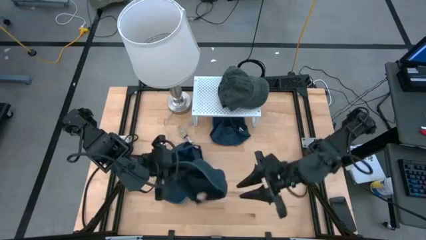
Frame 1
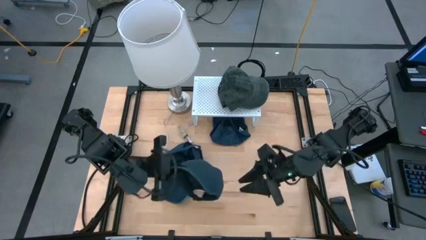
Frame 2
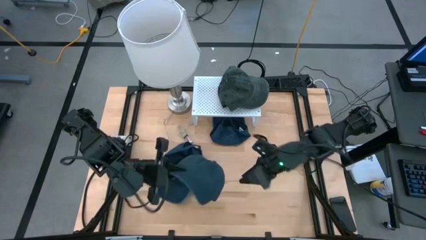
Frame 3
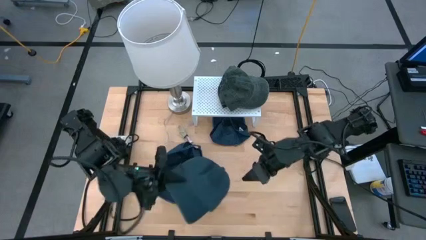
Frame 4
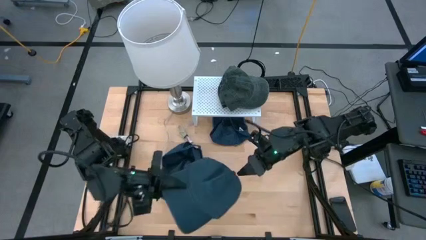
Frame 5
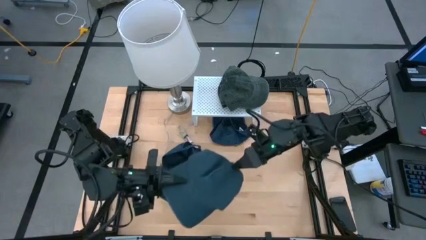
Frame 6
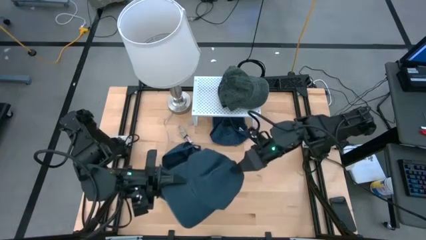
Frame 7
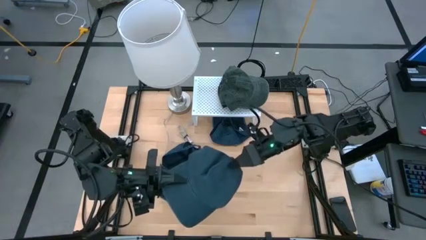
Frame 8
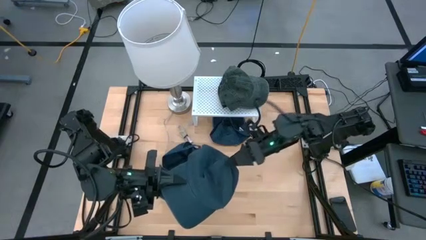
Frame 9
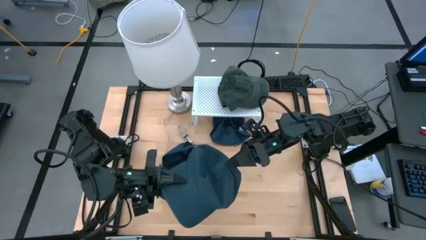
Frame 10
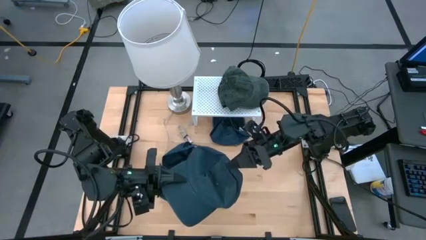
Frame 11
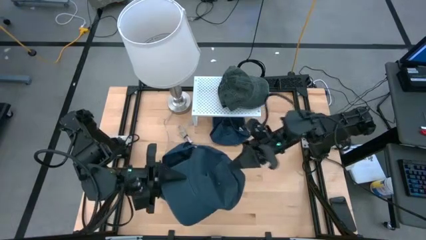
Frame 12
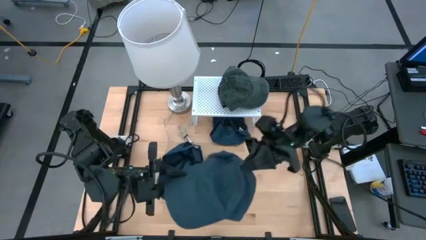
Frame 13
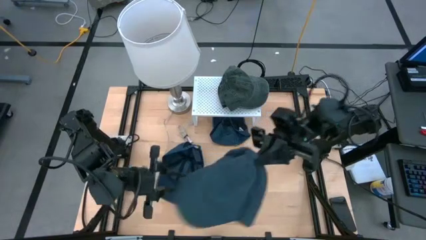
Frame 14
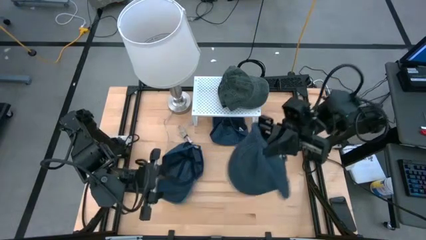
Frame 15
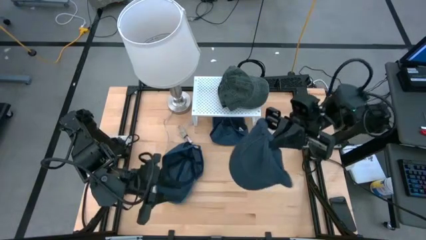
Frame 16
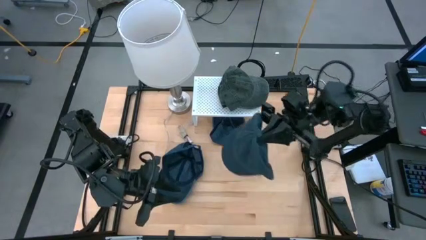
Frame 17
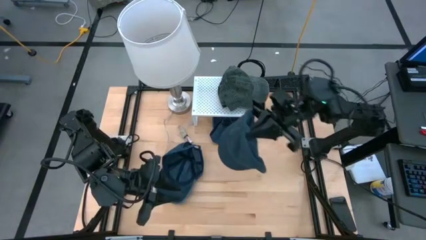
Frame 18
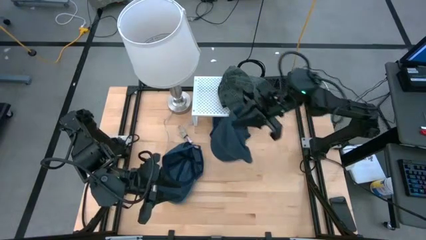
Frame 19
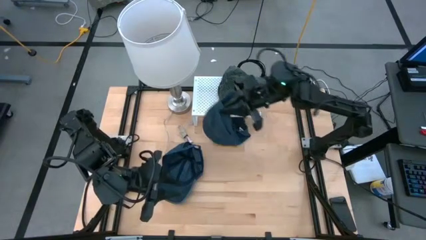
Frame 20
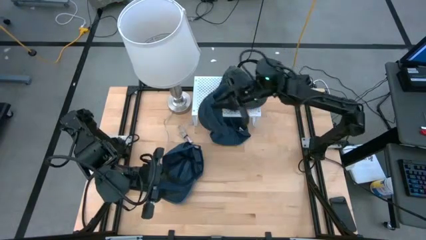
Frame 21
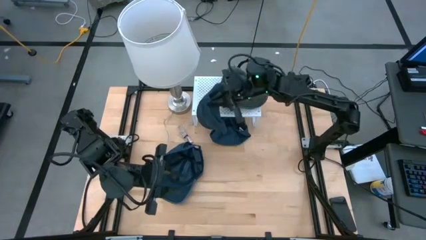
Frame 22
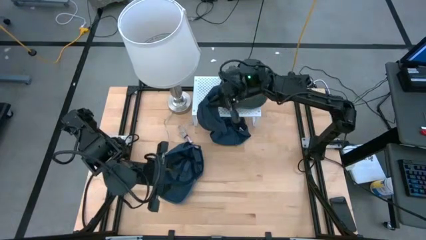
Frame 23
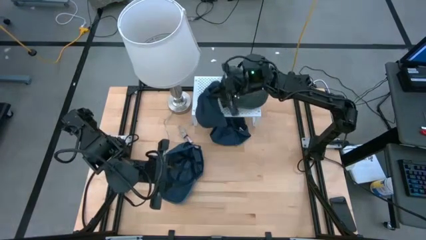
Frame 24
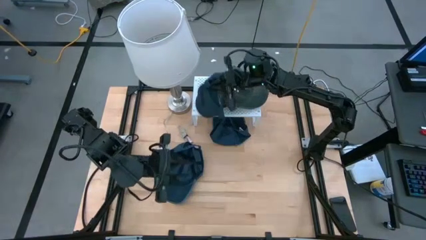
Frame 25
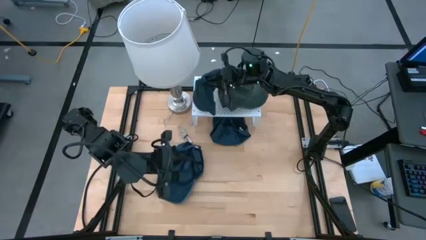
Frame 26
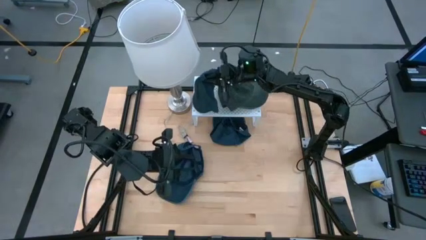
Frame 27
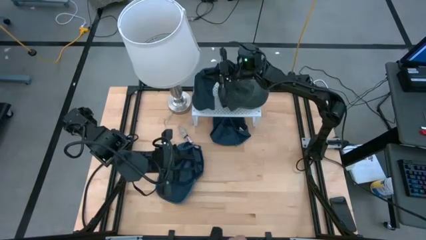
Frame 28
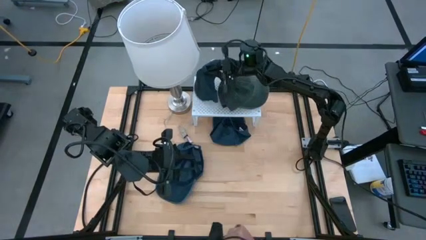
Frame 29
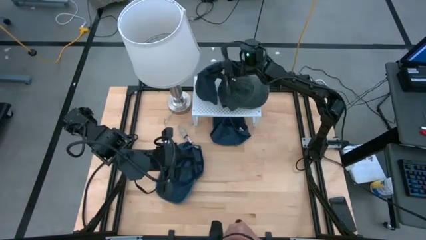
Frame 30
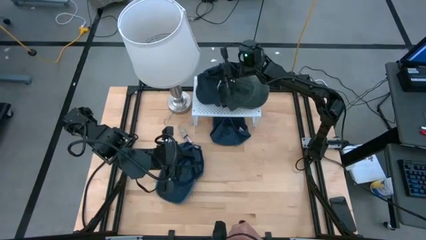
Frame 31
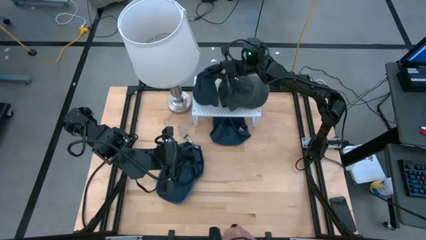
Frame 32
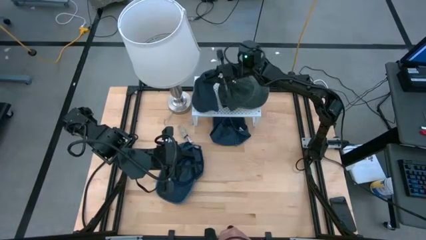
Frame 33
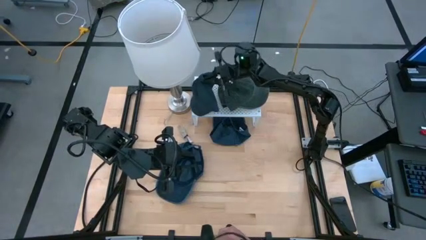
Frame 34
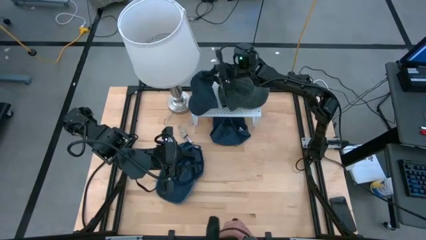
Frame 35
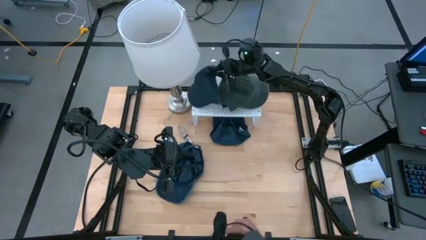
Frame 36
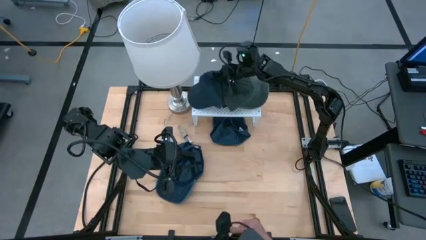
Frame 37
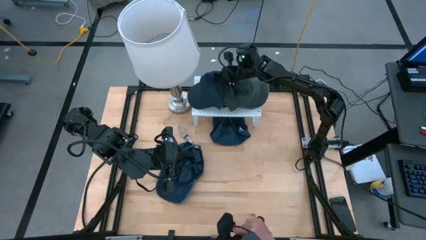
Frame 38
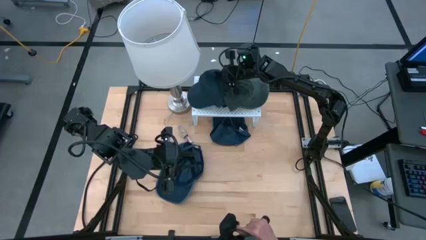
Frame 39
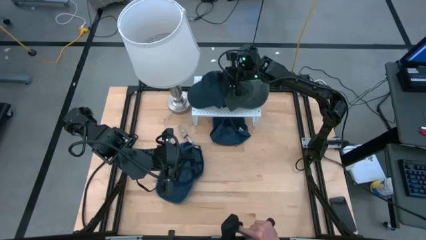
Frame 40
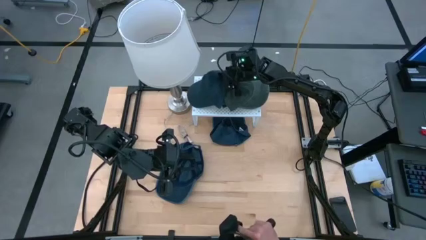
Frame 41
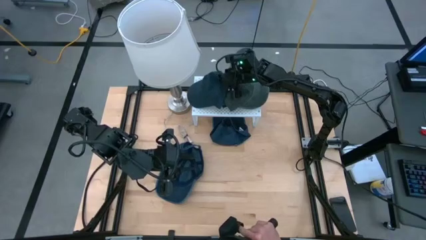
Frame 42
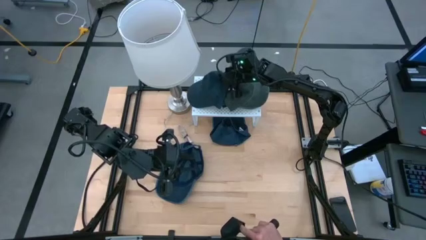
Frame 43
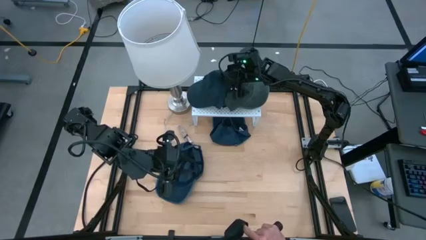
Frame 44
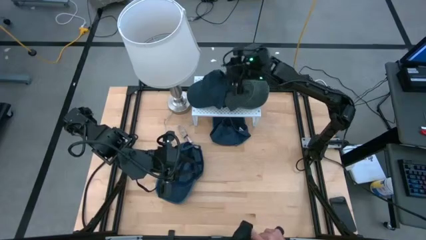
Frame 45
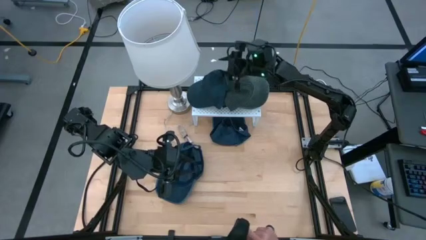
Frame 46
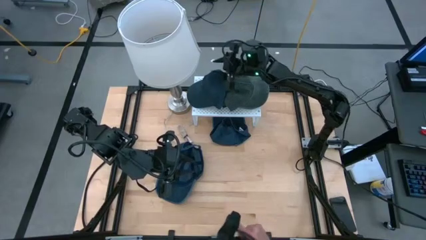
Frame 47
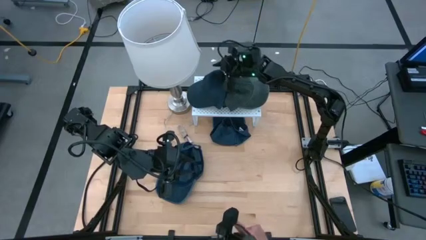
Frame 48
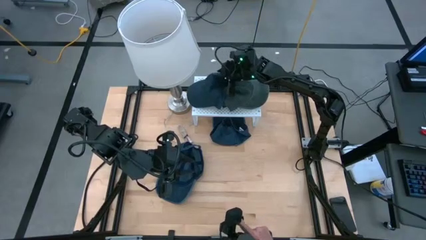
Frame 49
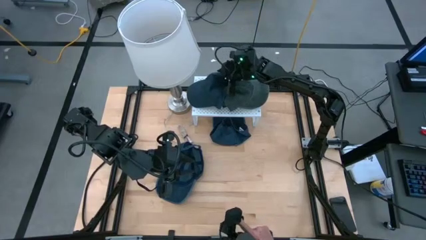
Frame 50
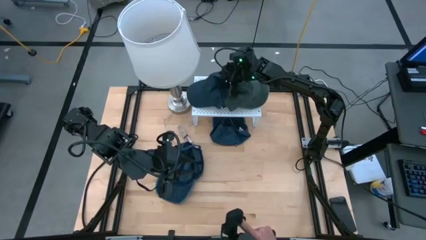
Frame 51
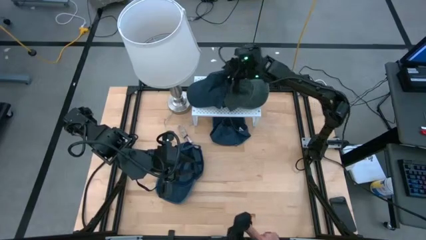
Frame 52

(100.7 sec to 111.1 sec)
Task: Pick & Place hat
Put the top right blue cap on the shelf

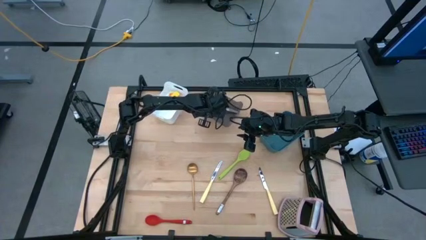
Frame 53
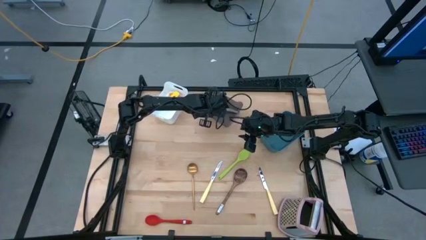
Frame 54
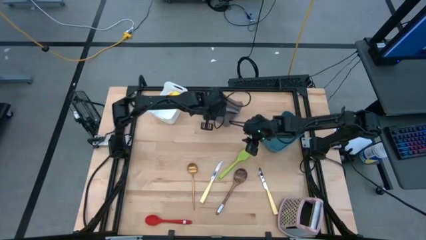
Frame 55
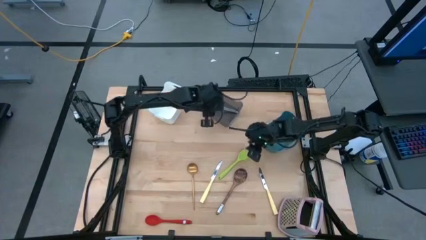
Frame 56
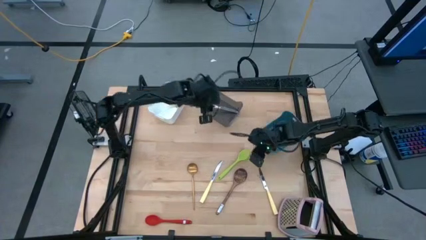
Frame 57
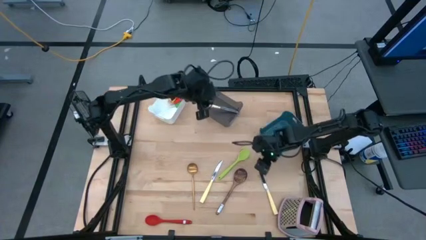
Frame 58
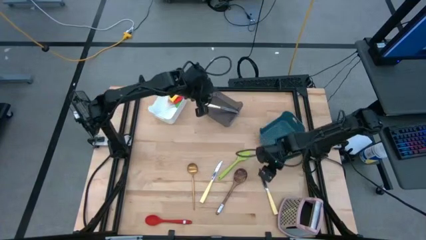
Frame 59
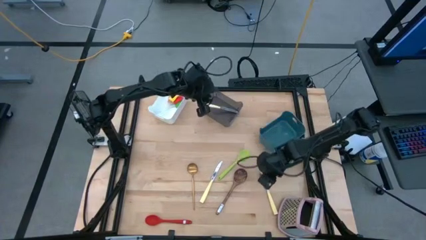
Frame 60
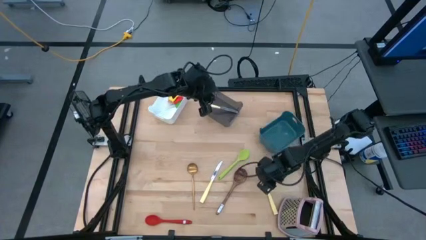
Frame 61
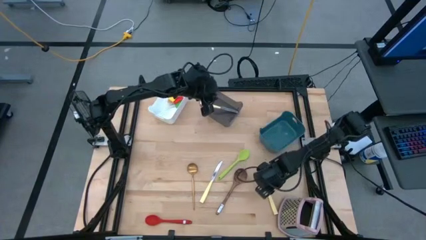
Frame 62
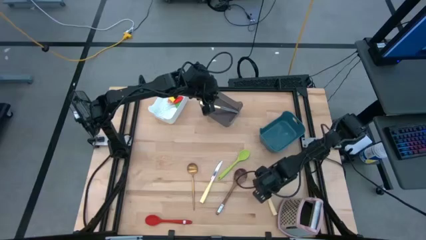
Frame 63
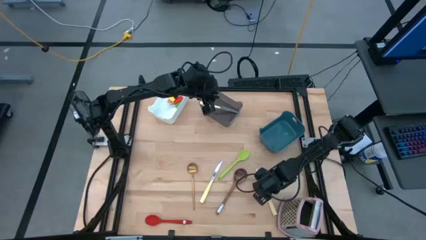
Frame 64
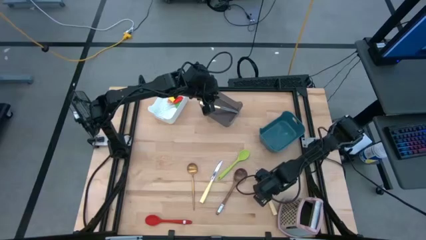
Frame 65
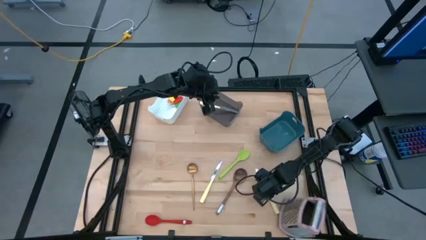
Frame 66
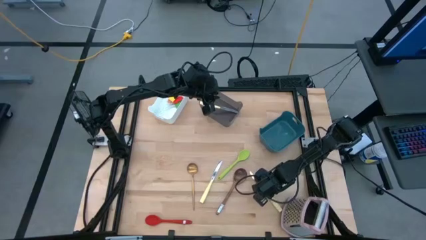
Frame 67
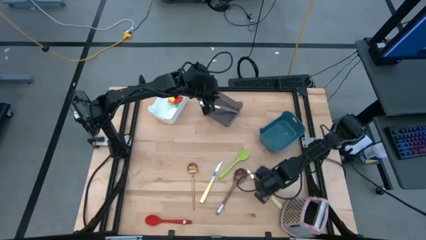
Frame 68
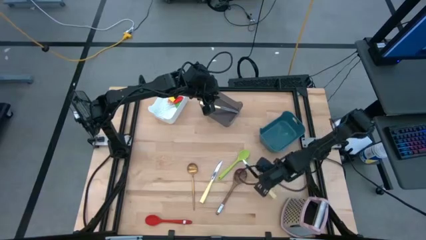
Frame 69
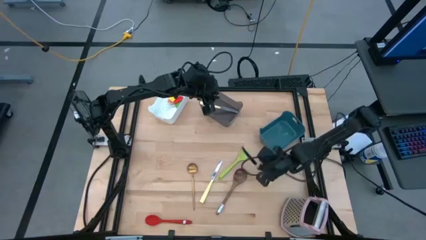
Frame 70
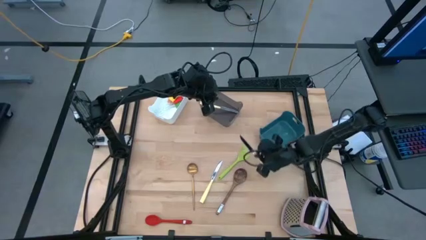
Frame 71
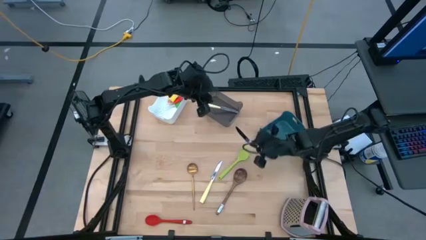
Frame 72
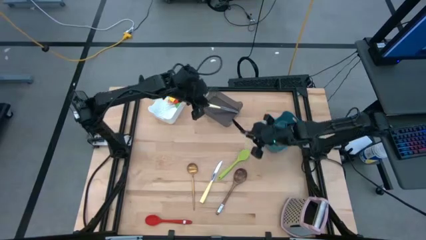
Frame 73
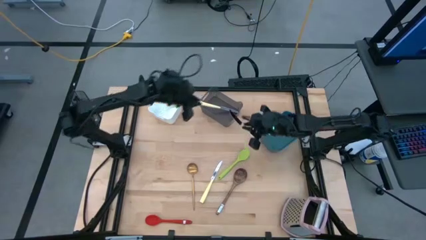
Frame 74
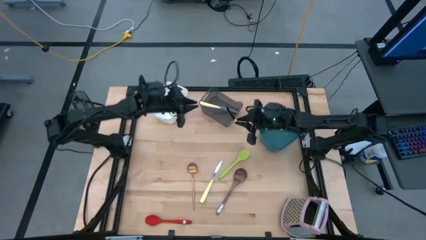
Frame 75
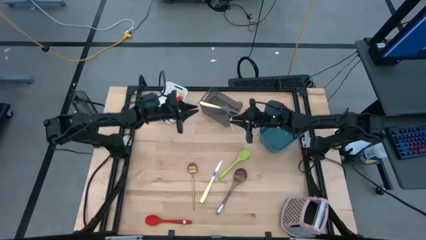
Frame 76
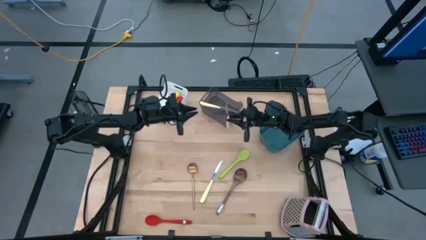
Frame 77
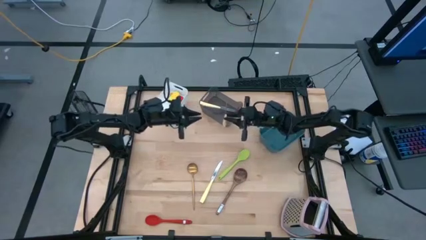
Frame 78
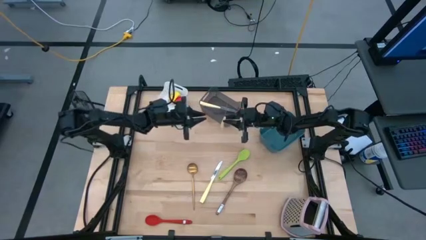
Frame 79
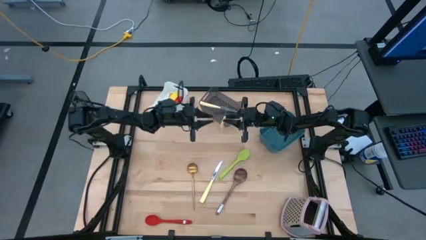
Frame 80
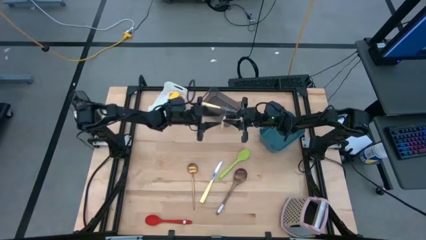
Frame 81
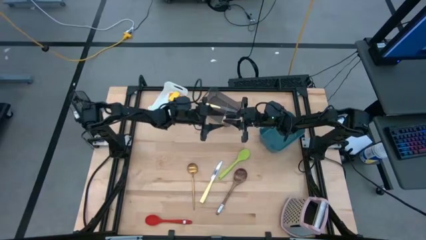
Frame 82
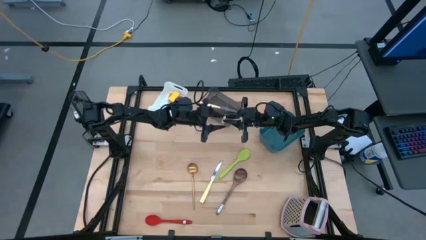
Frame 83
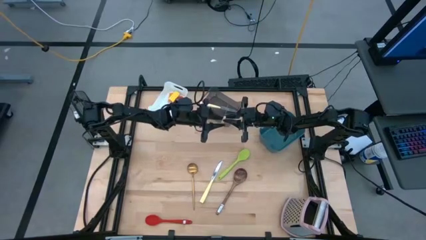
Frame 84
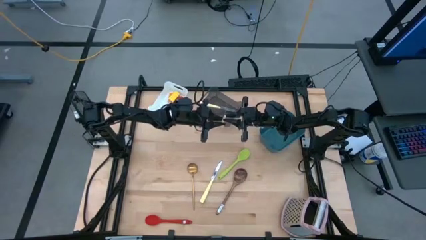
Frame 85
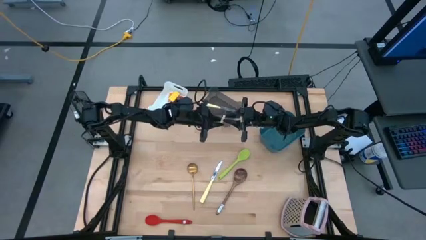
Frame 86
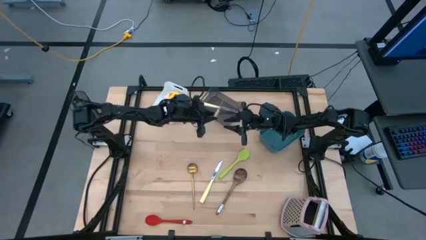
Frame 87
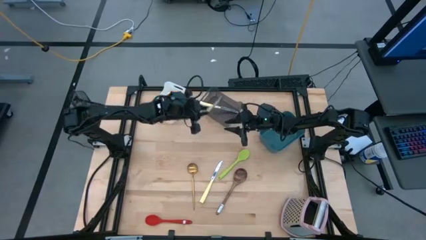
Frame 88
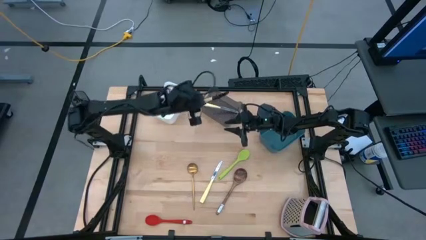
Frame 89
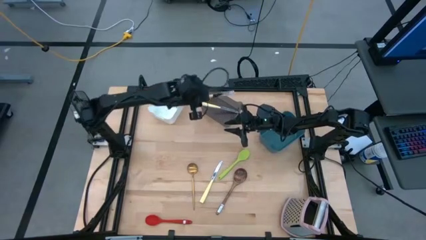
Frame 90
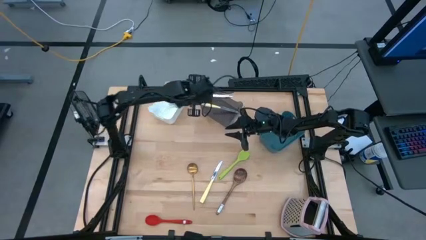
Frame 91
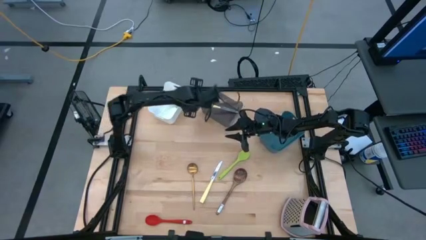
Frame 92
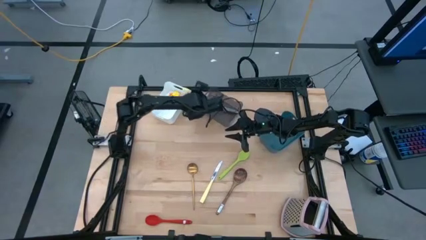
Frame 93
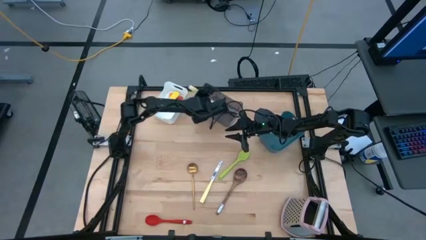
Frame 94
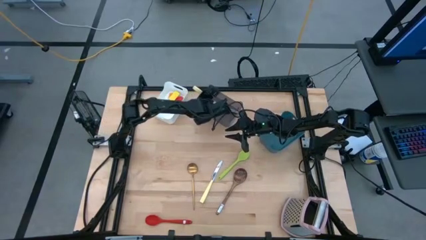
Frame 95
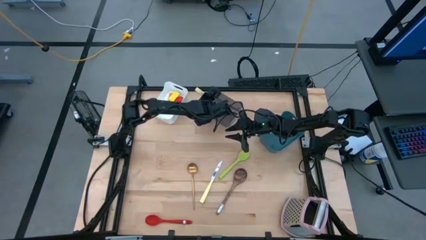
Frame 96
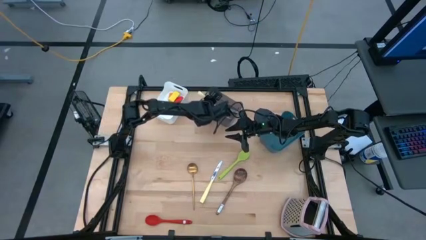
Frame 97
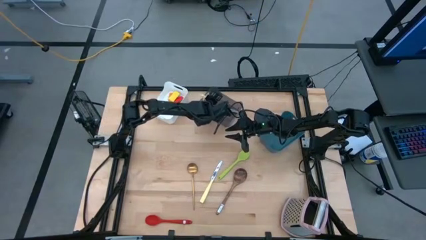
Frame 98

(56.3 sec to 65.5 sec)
Task: Pick & Place Kitchen Items
Put the right yellow table knife into the black bin
